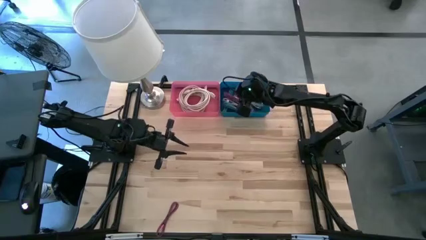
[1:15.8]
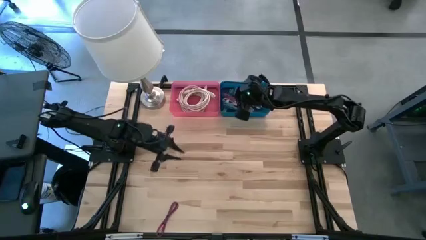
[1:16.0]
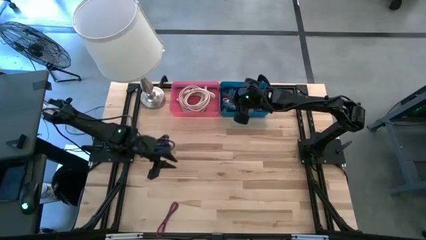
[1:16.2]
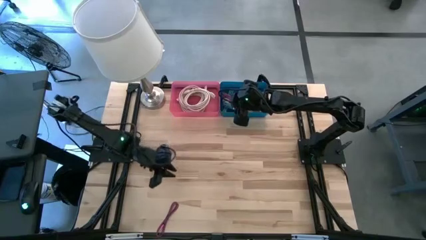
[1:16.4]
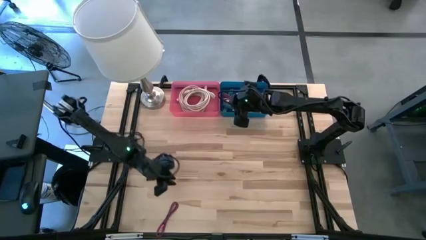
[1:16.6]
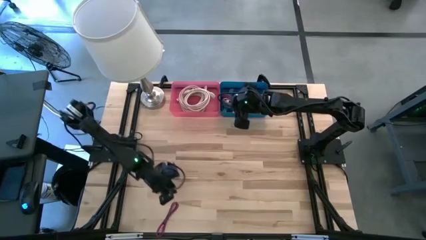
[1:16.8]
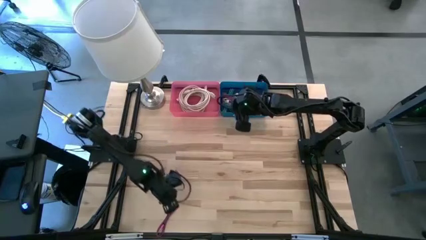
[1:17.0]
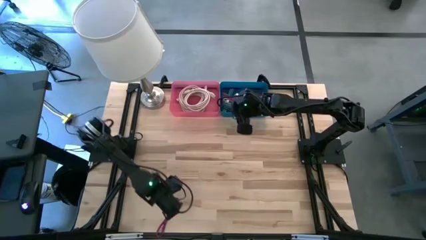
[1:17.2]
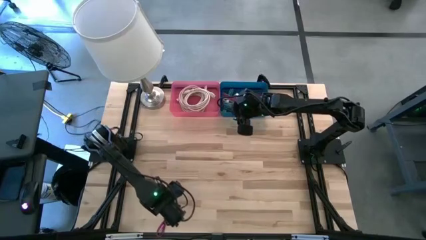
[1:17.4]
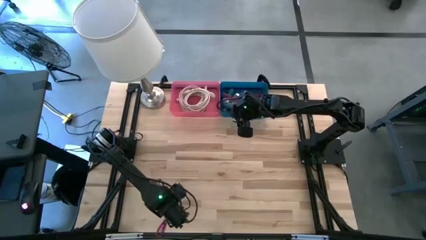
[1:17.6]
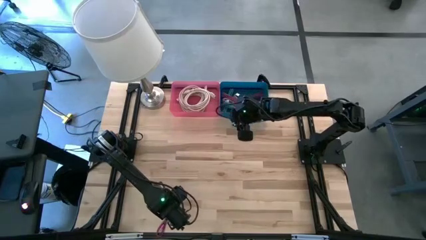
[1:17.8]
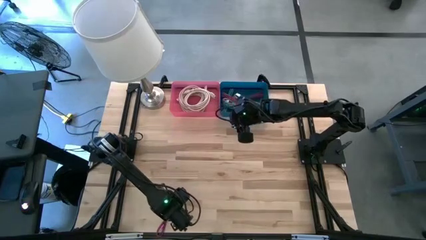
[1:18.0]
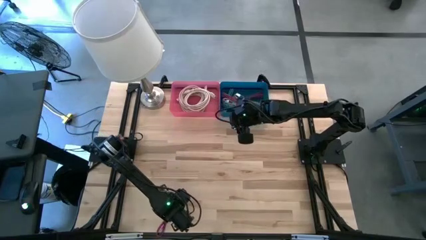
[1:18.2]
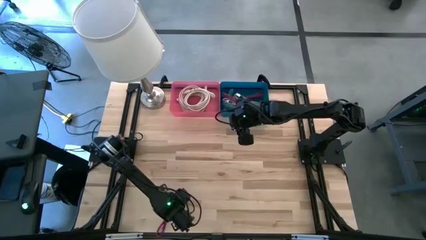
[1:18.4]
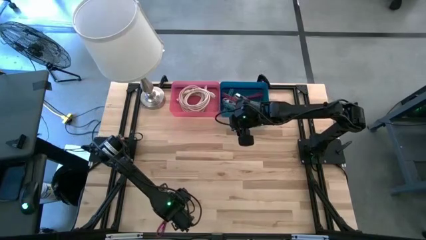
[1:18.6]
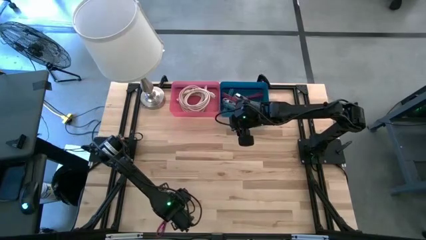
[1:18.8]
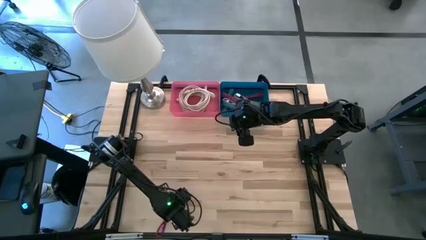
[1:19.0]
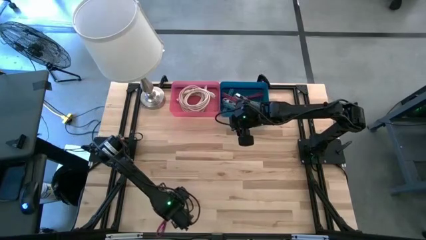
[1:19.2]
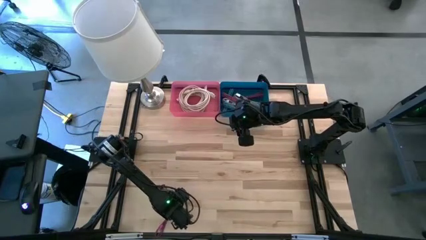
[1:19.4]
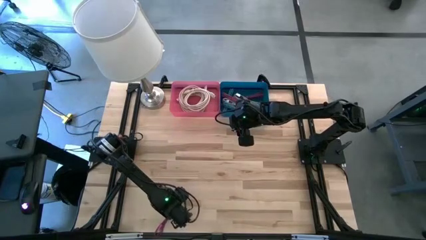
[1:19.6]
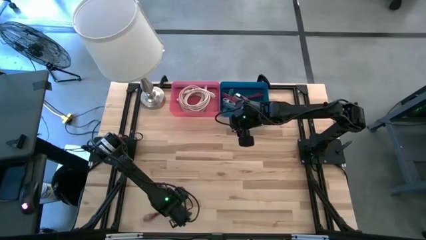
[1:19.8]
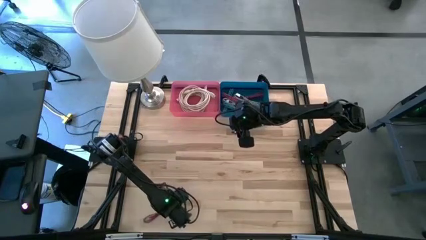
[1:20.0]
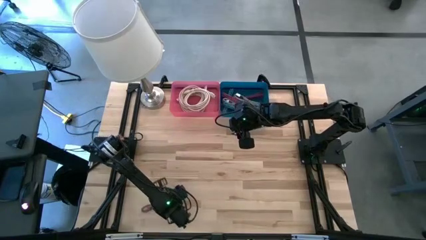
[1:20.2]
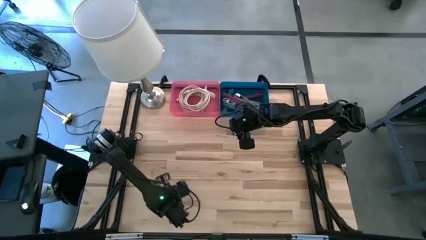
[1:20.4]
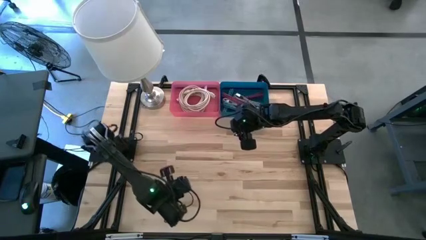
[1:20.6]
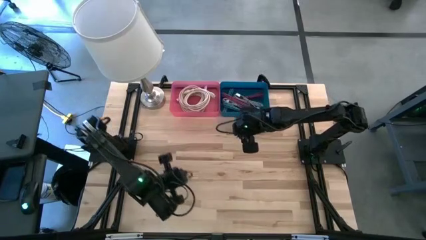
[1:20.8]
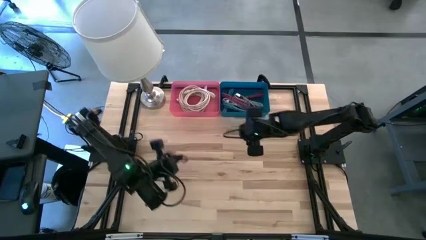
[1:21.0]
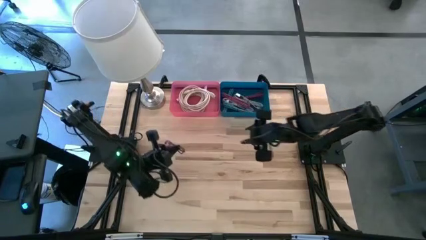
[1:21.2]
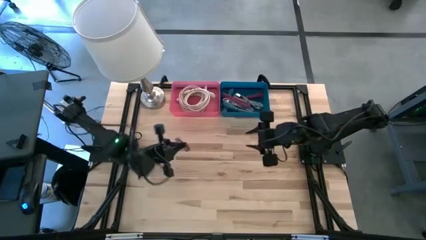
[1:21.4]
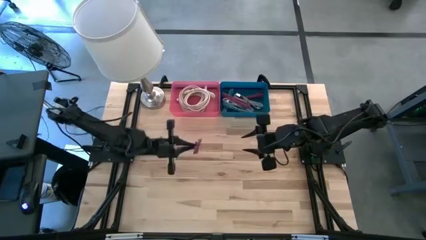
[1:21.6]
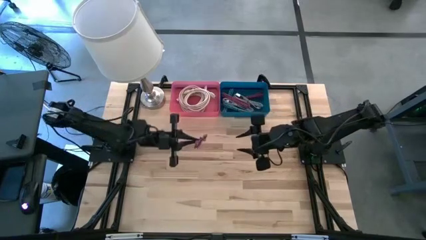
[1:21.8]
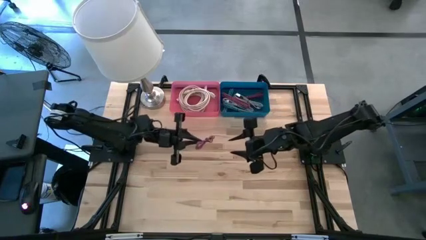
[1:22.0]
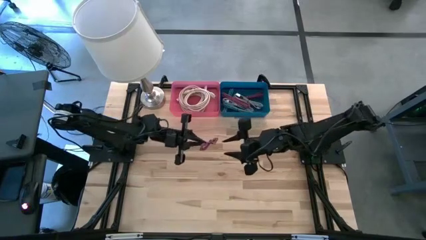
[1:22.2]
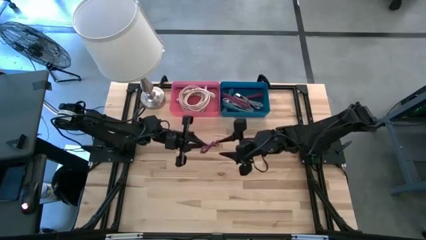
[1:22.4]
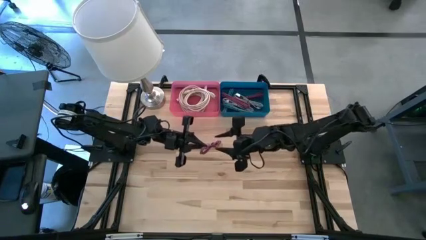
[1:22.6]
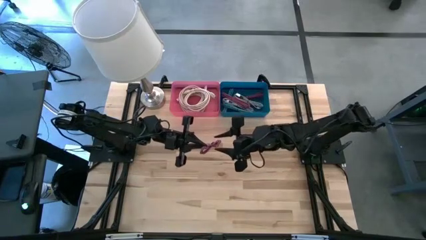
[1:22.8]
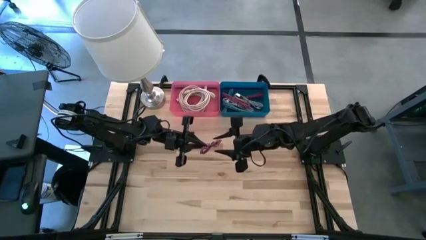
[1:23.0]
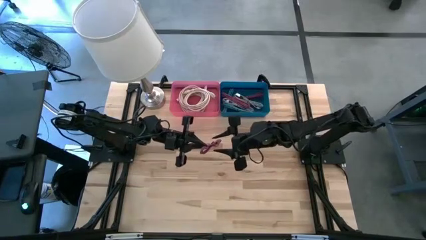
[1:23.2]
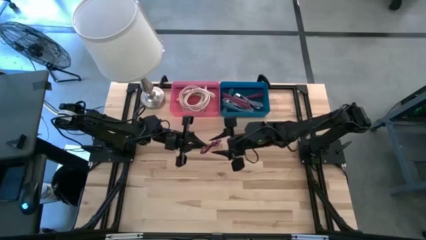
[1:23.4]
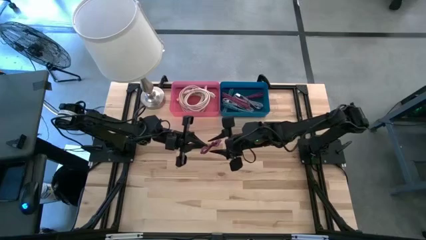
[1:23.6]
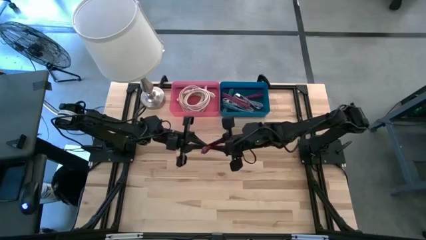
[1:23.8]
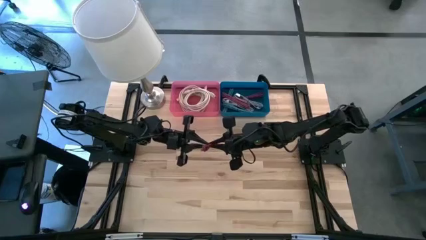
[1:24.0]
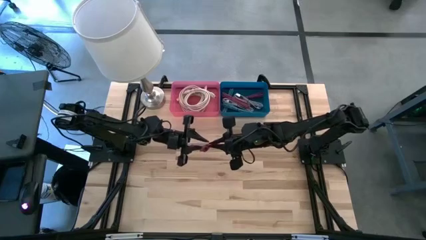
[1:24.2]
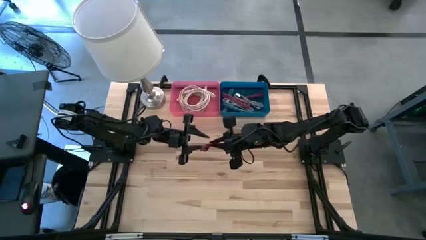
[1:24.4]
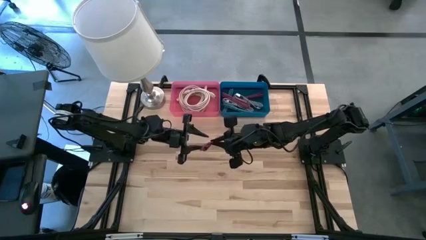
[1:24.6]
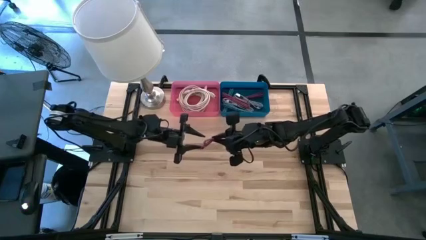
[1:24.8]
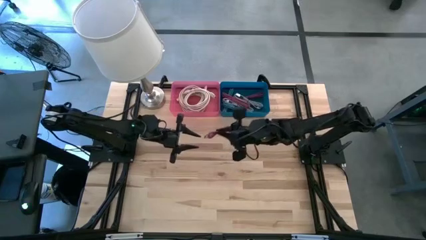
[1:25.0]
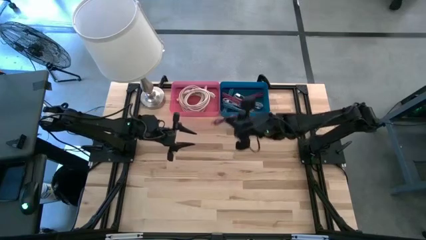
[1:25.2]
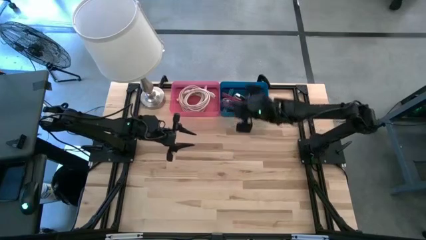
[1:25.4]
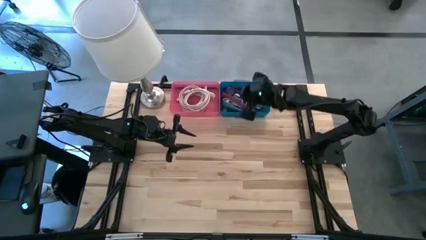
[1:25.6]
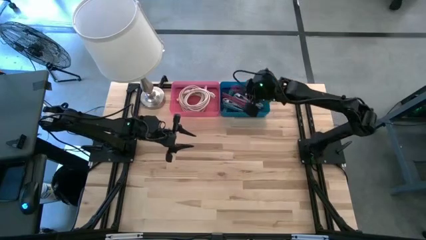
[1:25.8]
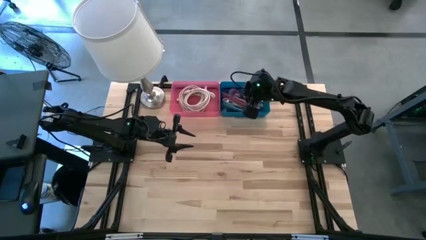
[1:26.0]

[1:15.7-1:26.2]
Task: Pick & Place USB Port
Put the small black and pink charger cable into the blue bin
